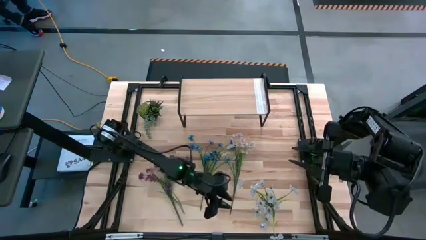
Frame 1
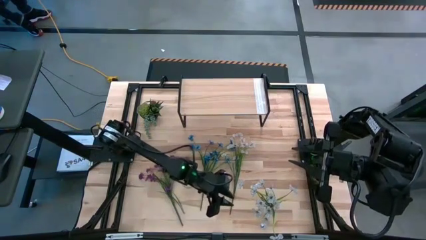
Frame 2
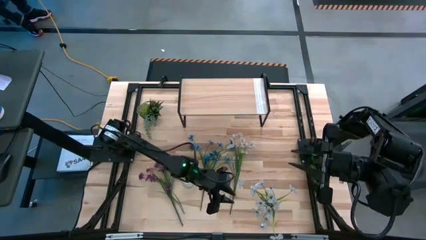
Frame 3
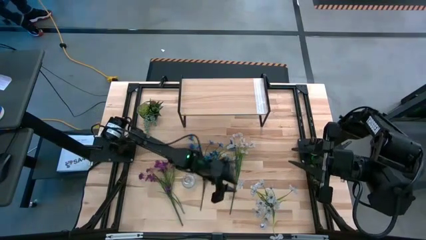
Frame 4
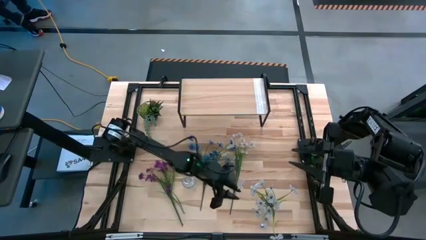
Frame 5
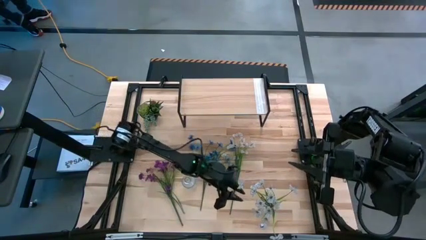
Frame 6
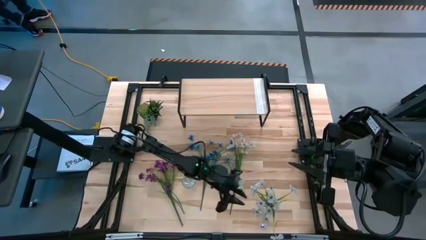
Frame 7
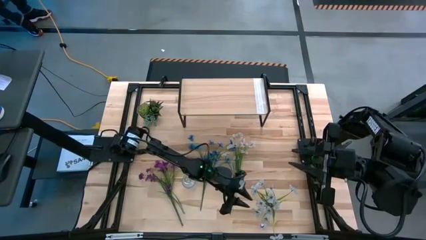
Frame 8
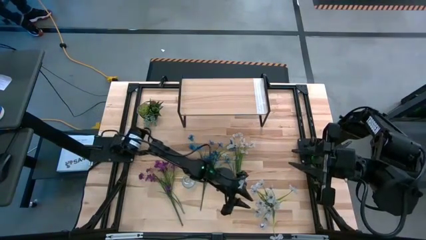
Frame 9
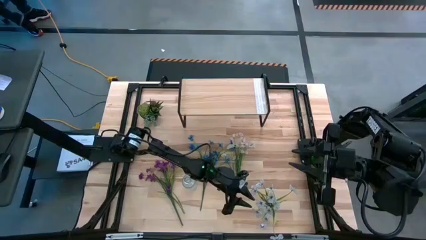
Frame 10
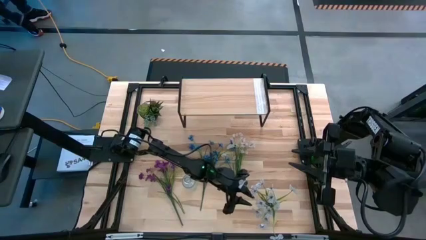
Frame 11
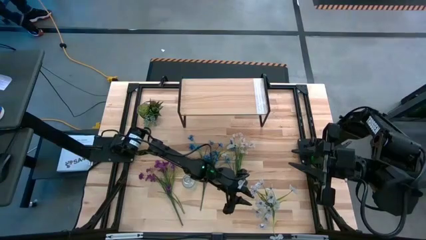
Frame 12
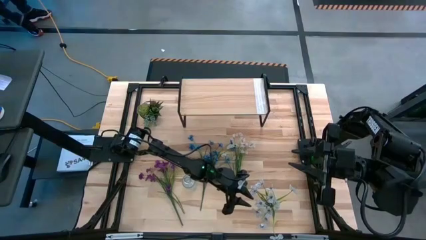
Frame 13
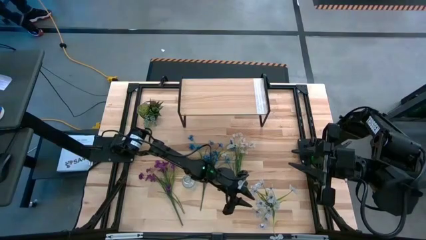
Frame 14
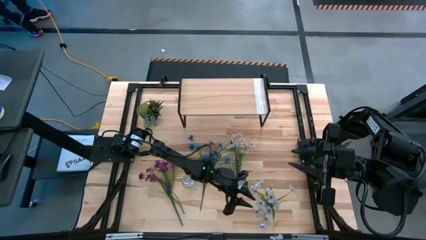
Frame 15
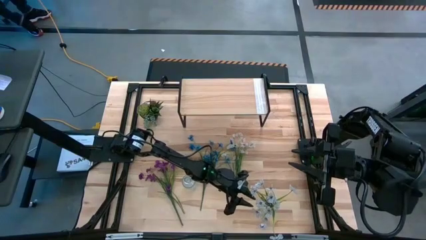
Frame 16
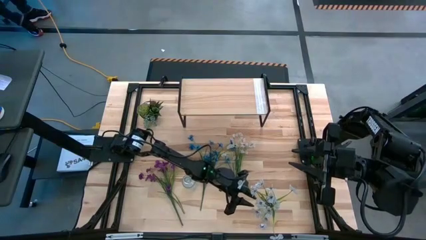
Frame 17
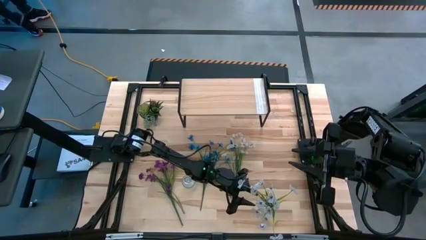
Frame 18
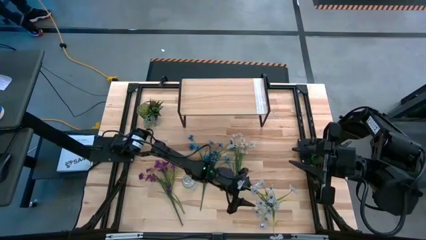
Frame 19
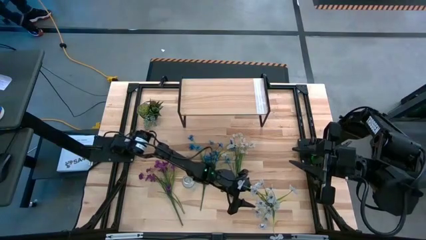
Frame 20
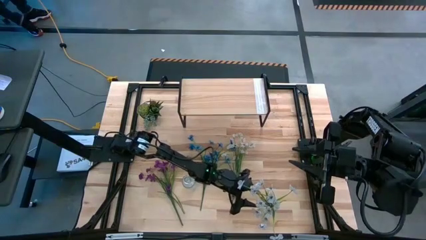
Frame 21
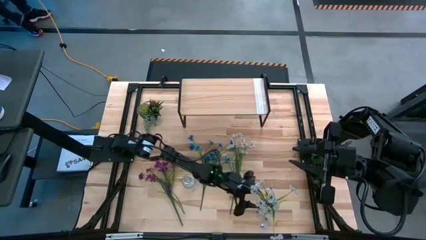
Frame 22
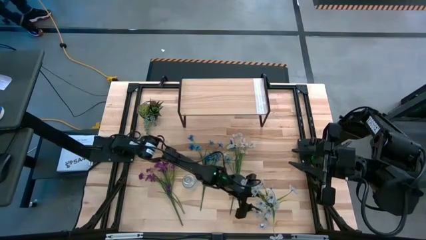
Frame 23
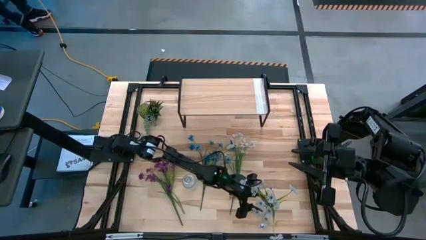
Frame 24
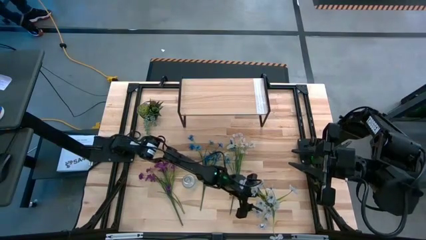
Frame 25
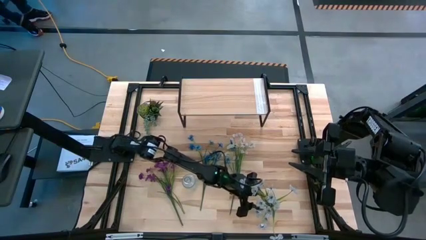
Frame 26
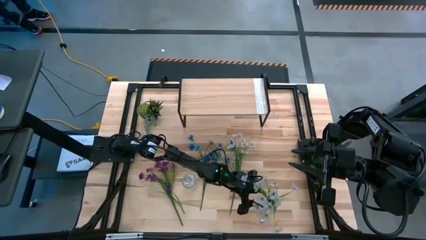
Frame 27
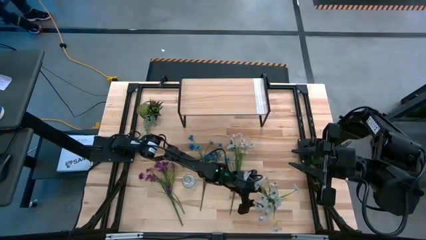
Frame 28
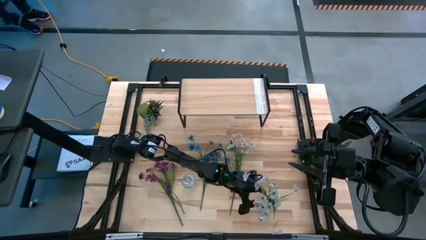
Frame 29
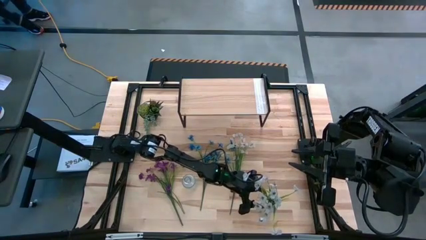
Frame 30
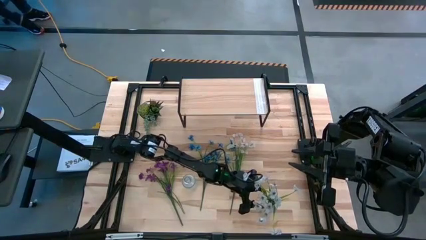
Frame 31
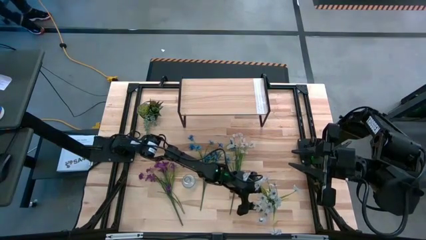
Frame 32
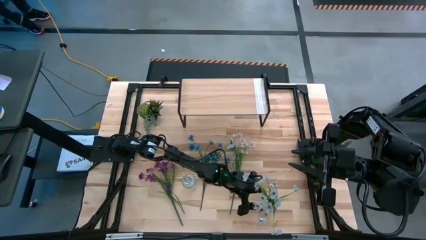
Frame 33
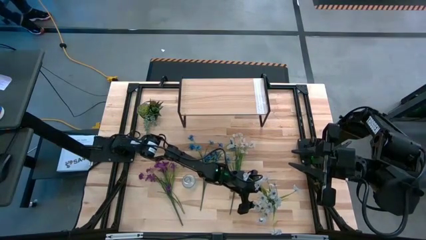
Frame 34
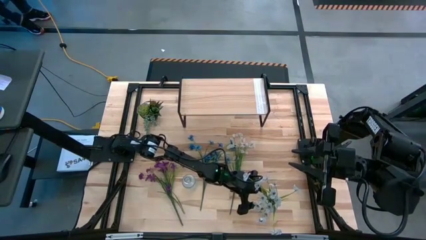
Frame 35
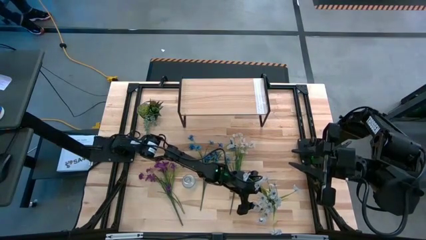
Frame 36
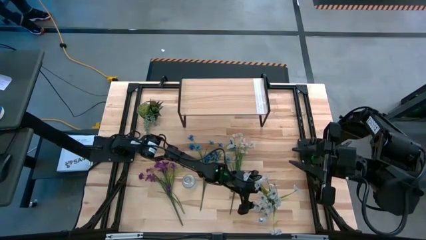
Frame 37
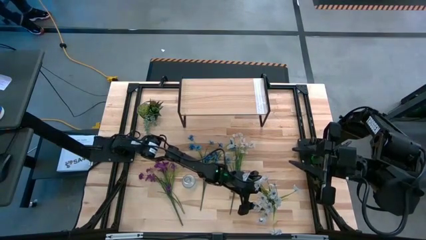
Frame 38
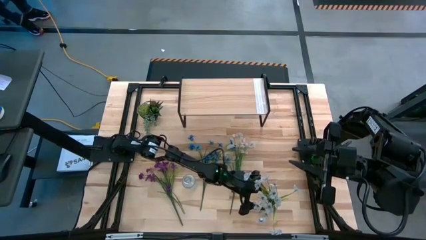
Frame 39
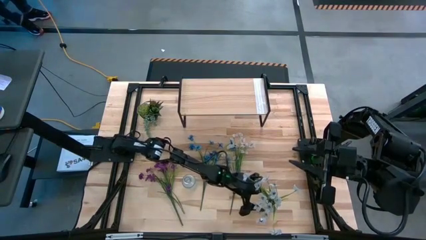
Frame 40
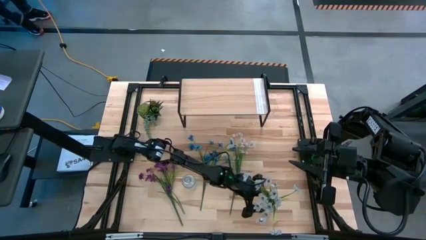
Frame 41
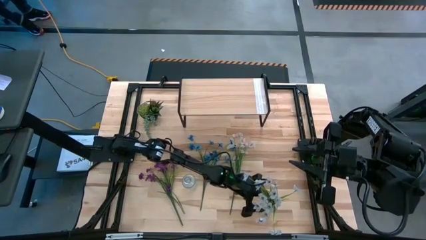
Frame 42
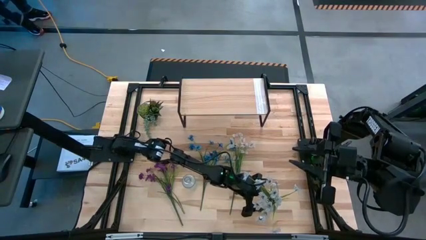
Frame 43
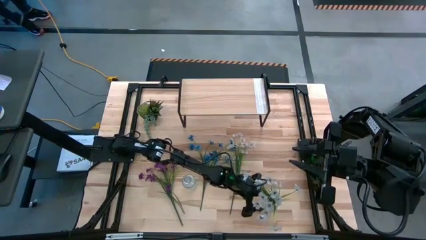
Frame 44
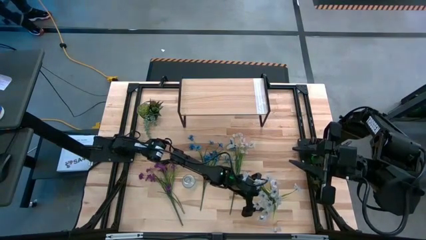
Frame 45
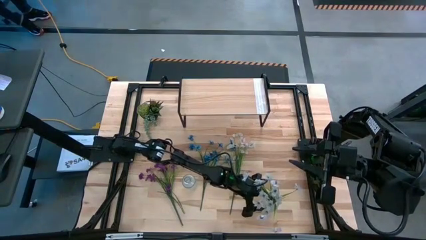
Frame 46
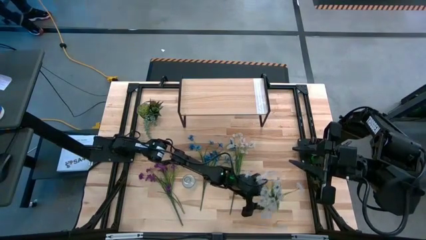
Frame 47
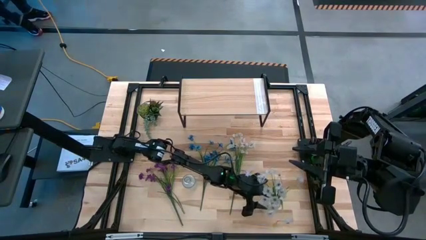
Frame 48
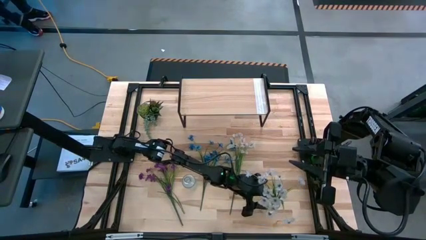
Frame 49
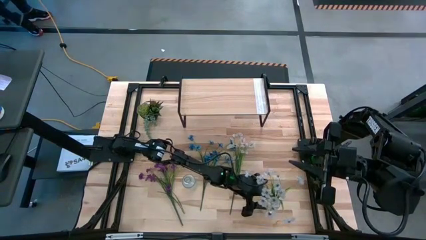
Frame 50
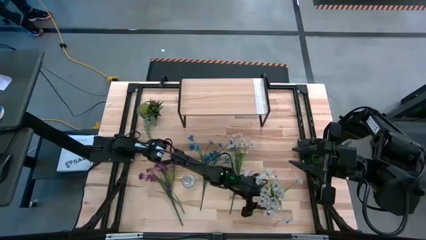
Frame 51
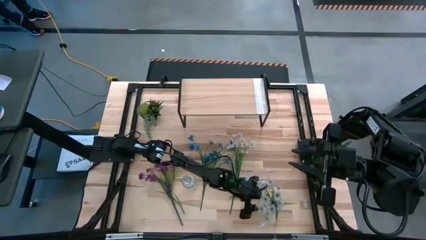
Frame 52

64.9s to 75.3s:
Task: Pick and place flowers into a vace then onto a shelf
Adjust the right transparent vase

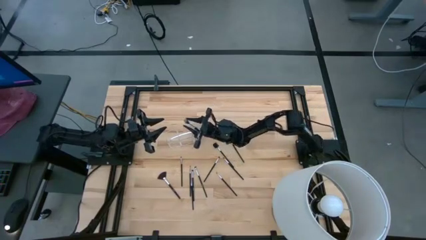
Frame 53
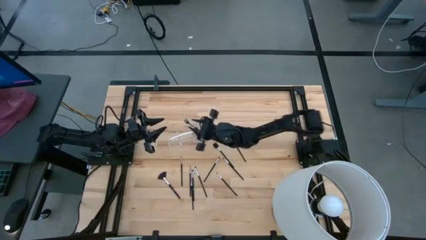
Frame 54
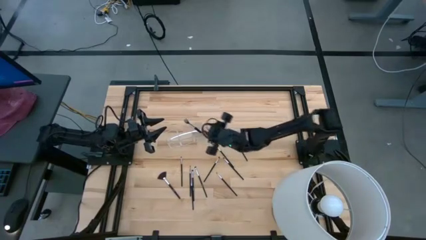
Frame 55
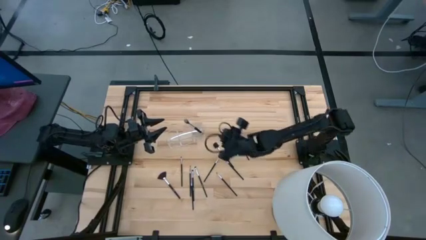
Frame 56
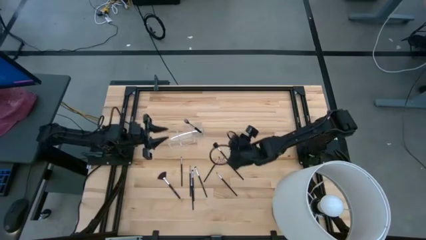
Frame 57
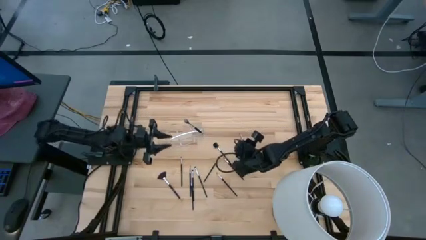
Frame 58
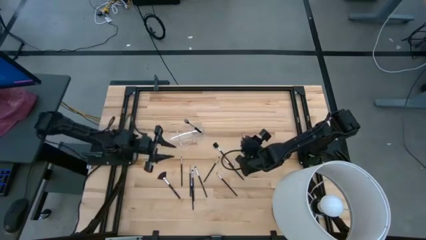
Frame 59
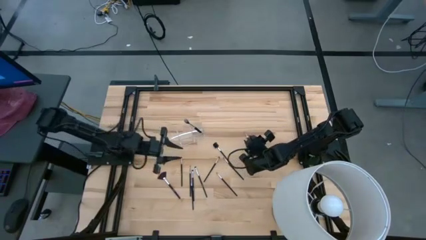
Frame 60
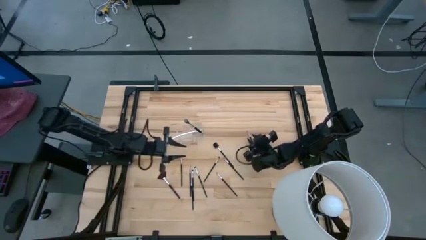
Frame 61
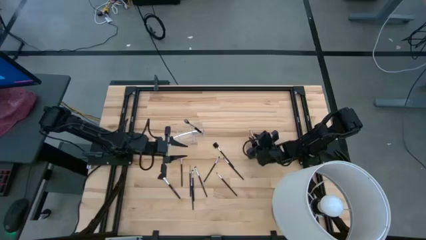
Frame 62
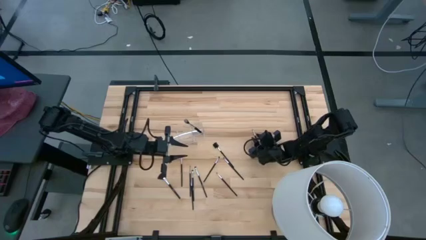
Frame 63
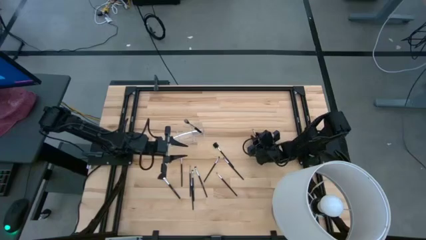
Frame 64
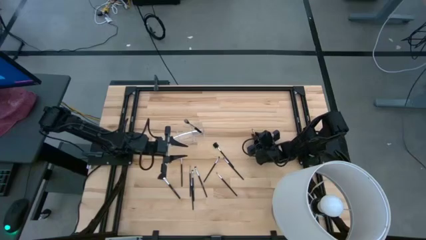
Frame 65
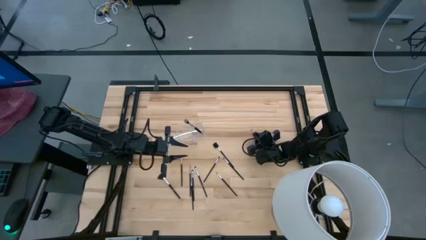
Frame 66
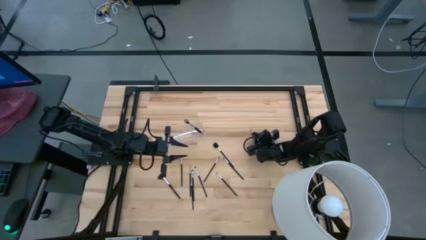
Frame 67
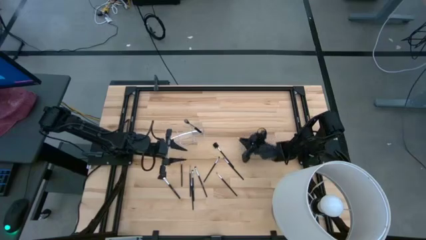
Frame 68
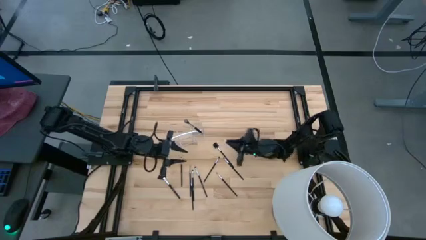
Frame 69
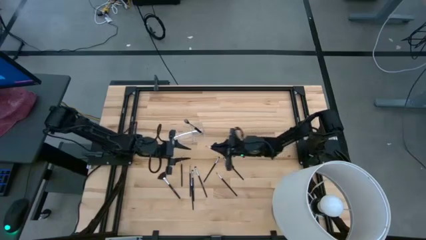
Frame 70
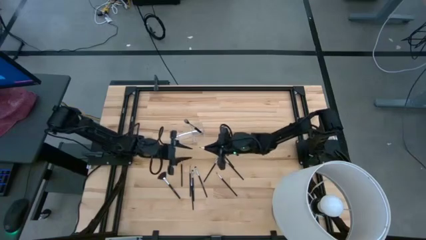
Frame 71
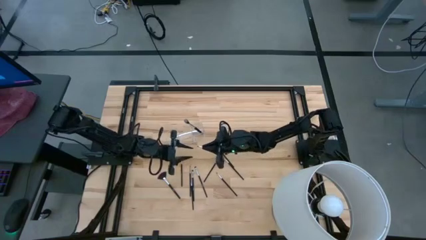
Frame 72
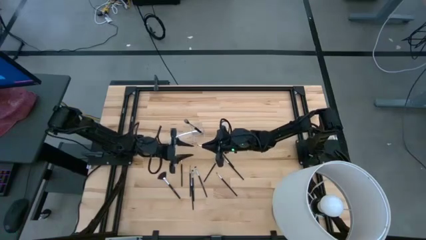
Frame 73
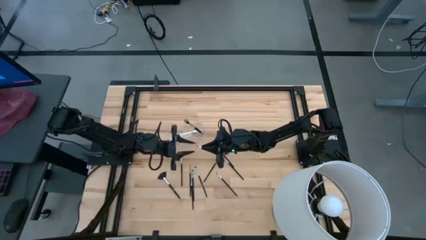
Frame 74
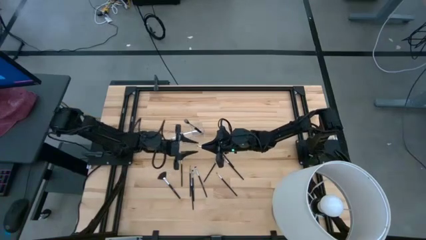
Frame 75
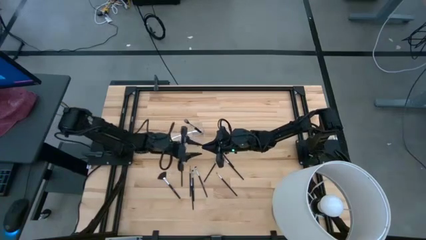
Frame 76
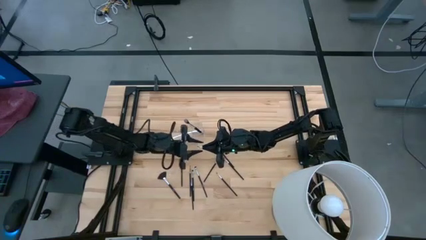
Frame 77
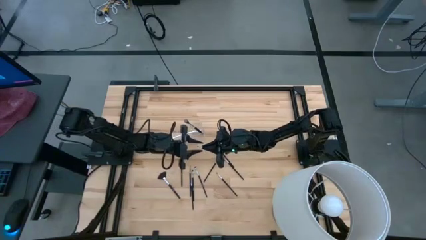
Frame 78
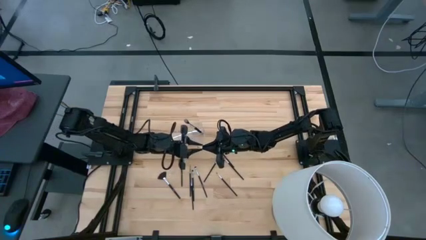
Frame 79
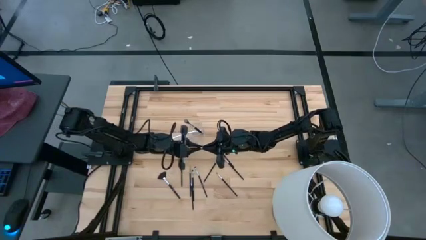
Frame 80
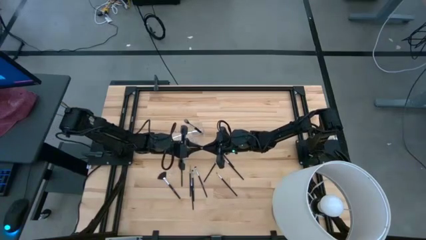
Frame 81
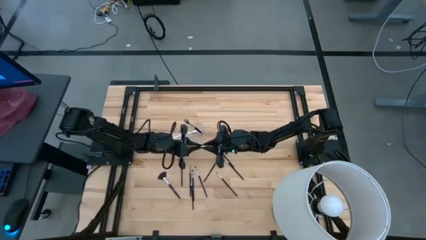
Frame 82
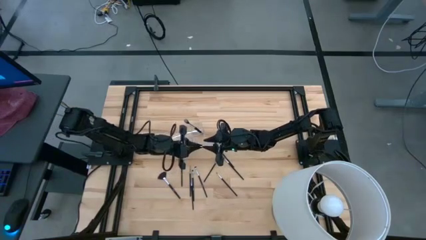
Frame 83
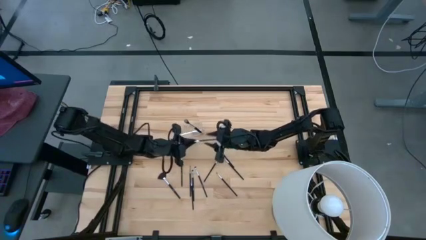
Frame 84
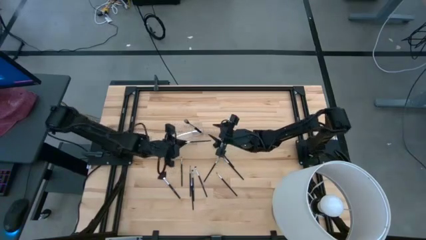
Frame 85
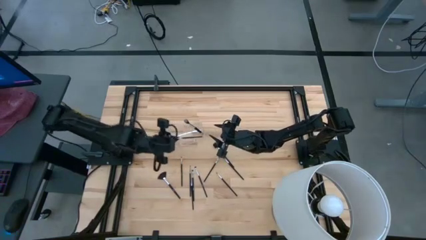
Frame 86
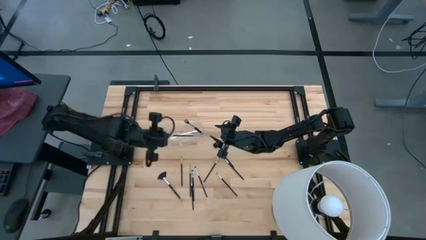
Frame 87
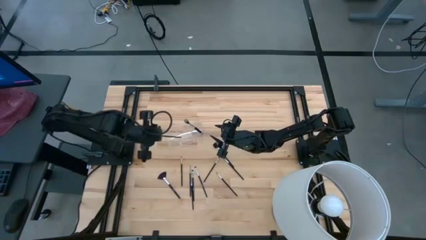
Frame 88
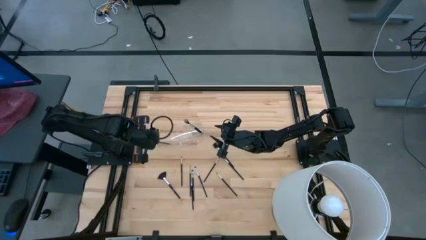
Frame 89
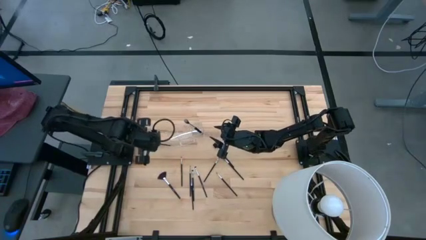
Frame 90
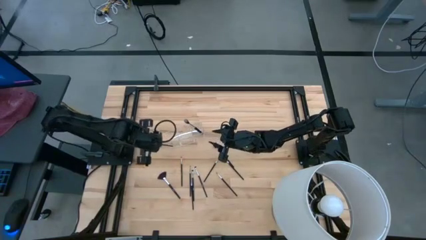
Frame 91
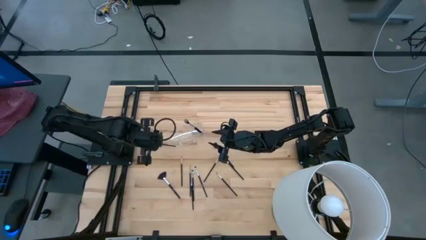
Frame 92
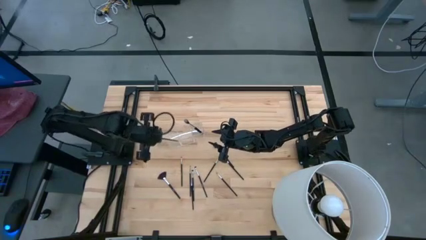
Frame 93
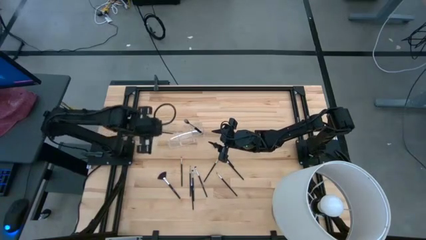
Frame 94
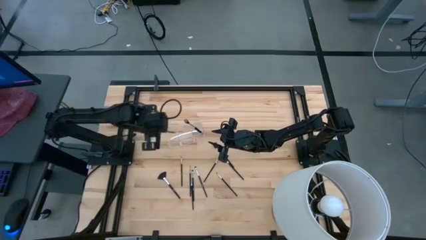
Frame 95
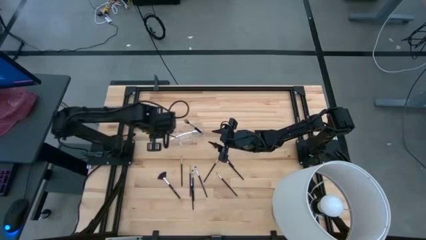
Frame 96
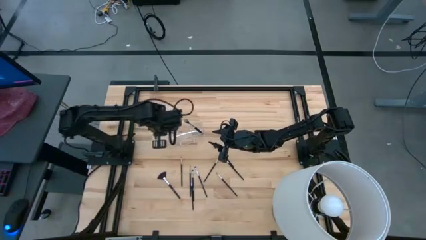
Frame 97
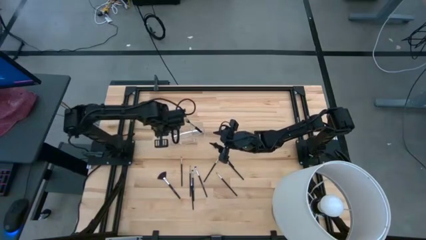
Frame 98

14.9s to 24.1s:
Task: Put items in baskets/containers
Put the liner brush into the left section of the transparent organizer
